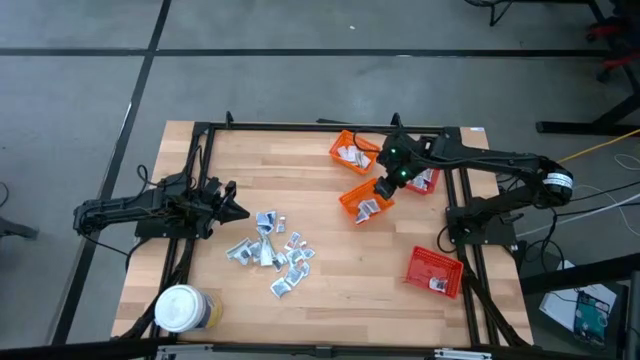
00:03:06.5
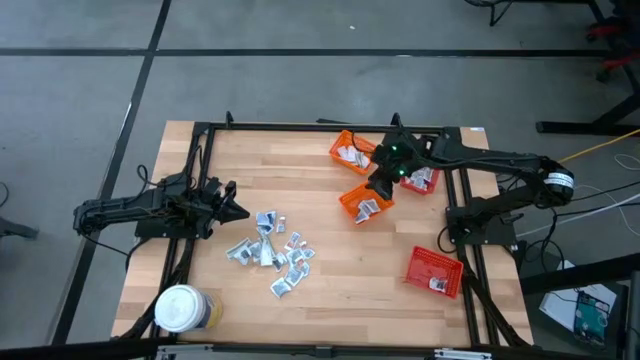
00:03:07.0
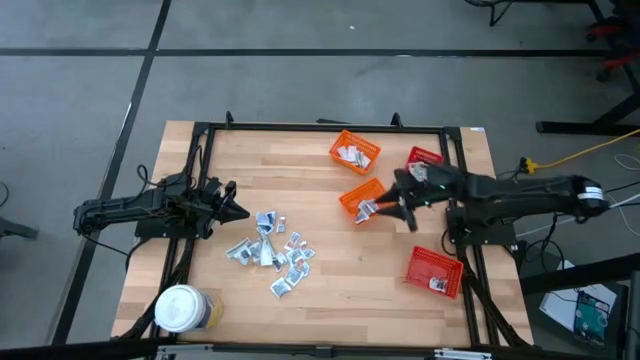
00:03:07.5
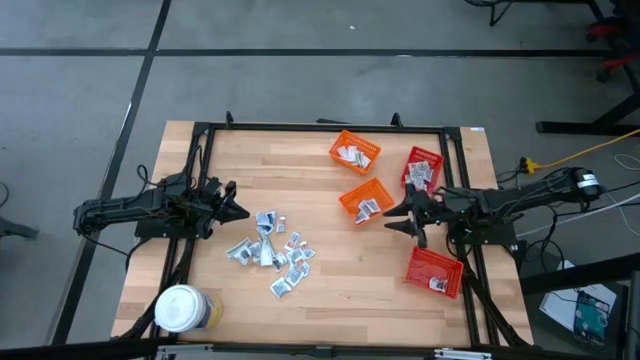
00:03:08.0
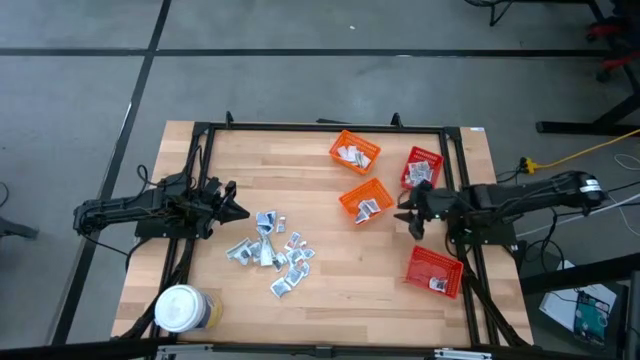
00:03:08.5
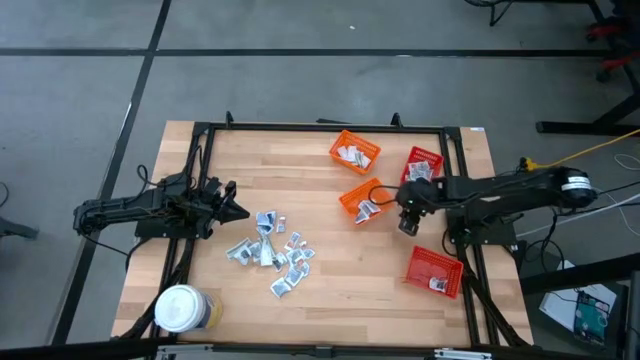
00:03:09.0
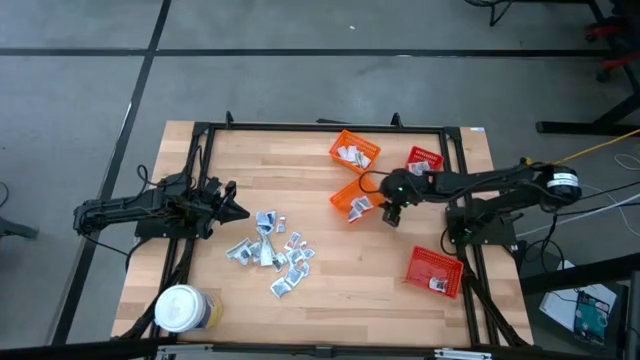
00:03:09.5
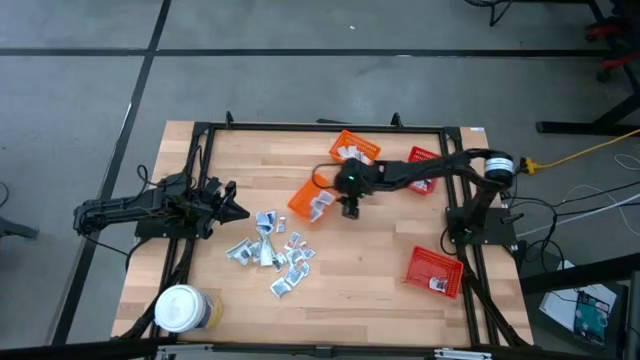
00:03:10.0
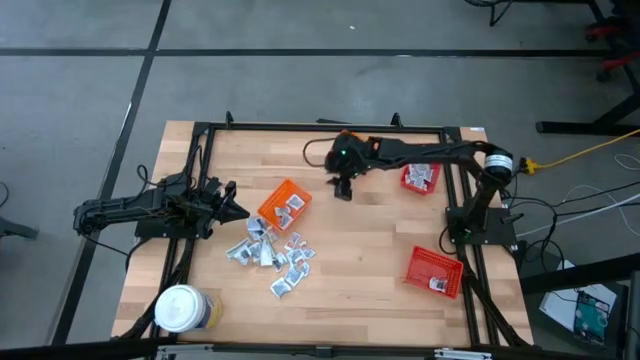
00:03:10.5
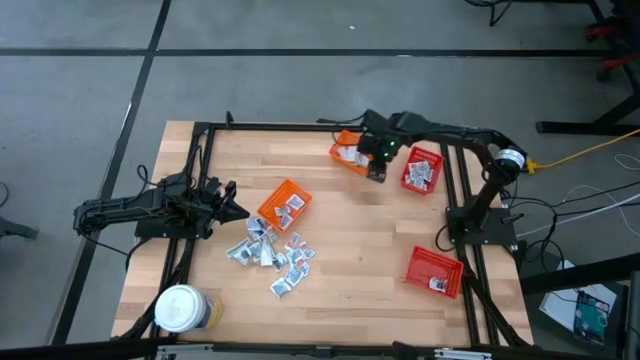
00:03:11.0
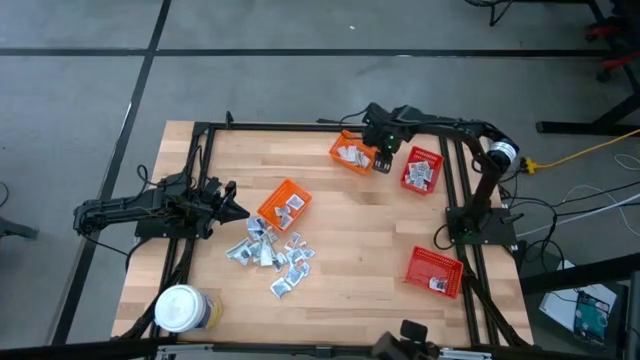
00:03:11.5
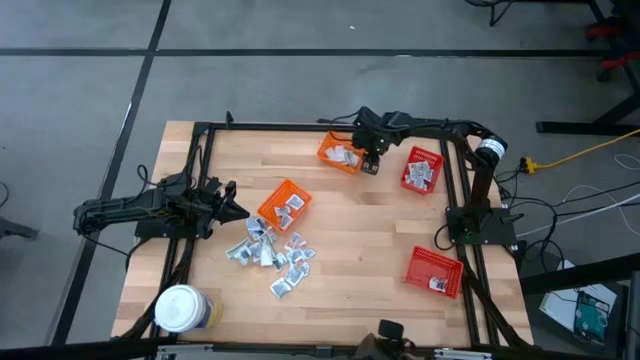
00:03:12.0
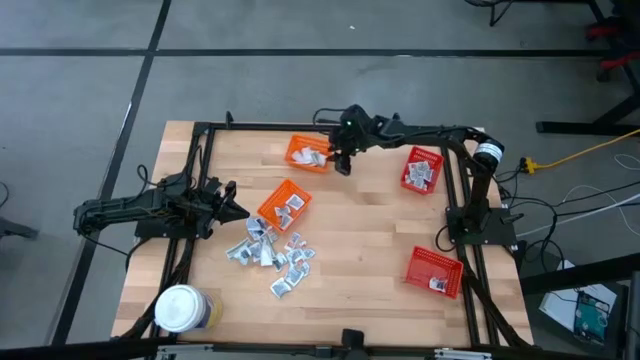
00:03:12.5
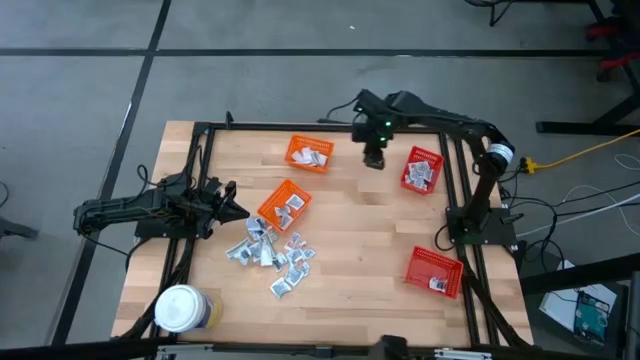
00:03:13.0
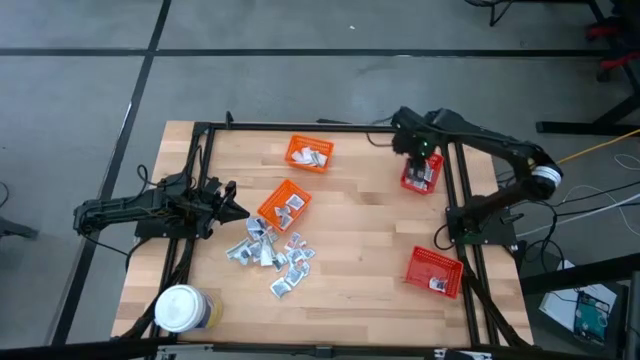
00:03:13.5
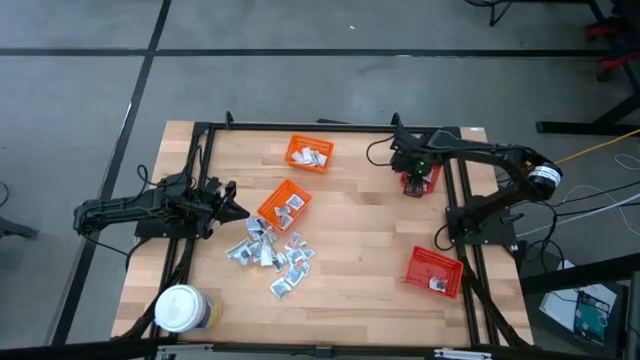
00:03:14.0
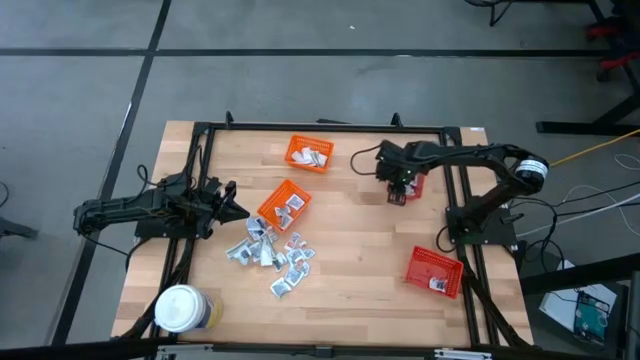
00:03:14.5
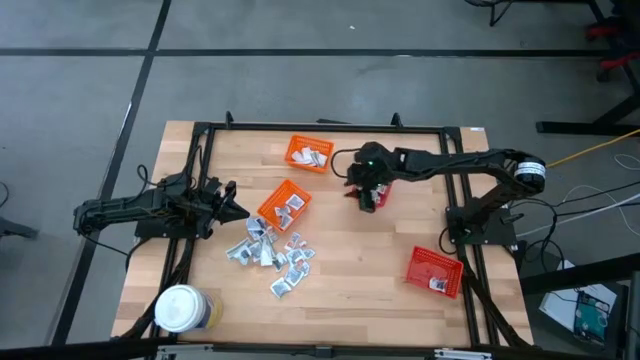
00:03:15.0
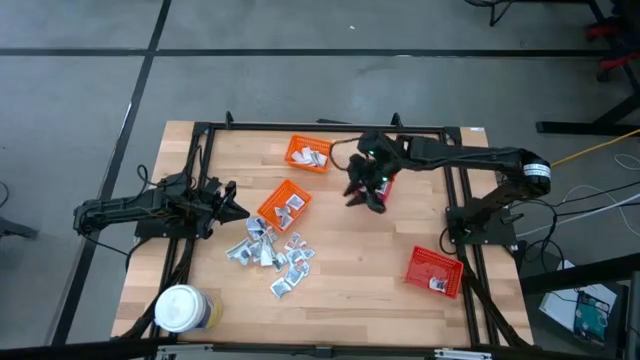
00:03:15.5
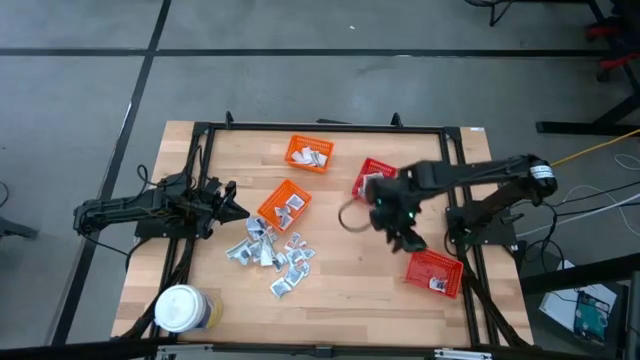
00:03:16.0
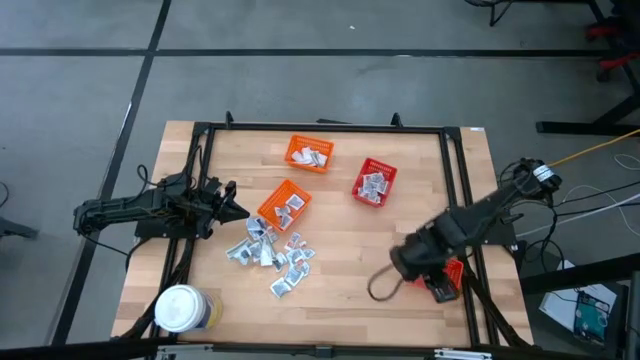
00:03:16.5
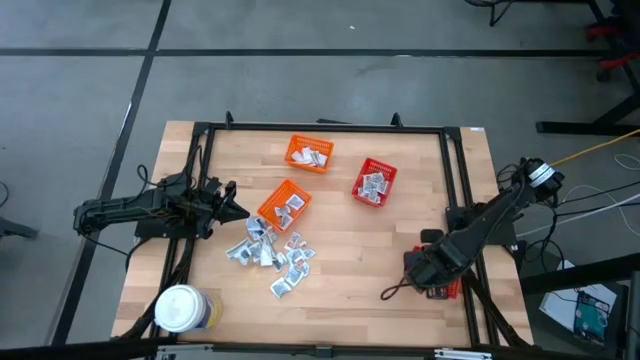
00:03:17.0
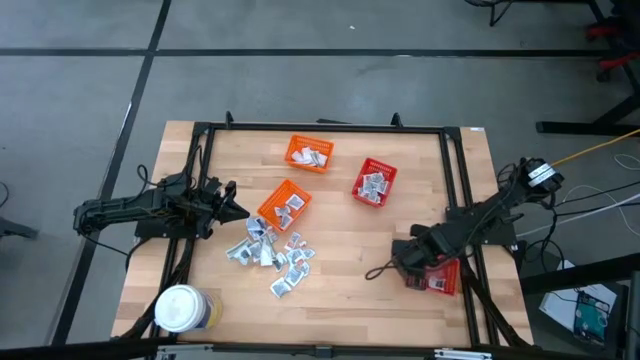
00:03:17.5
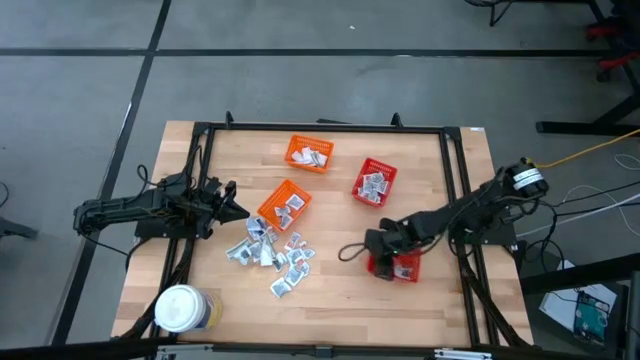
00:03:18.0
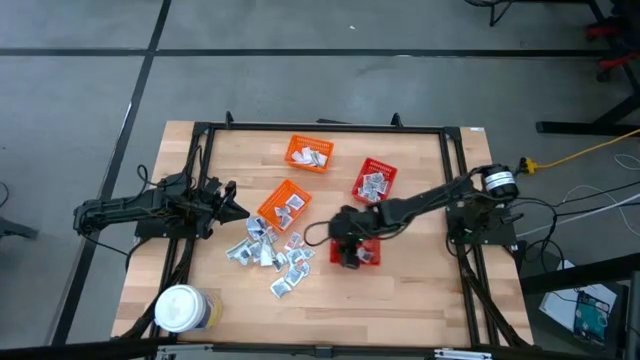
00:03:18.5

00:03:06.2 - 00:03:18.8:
Task: Pick & Place First Aid Supplies
Adjust the bins

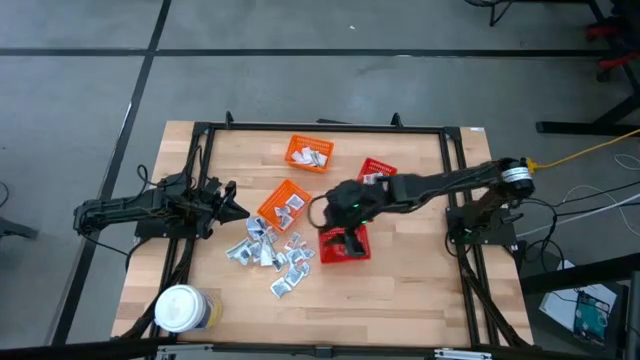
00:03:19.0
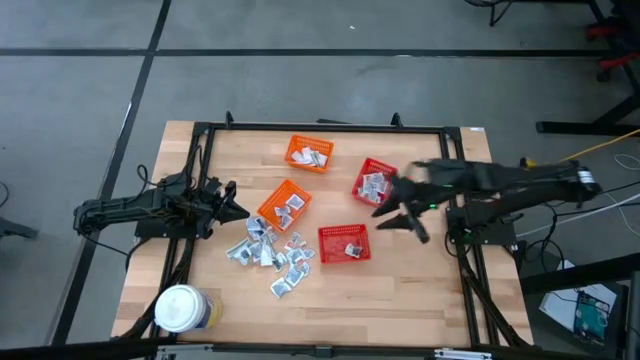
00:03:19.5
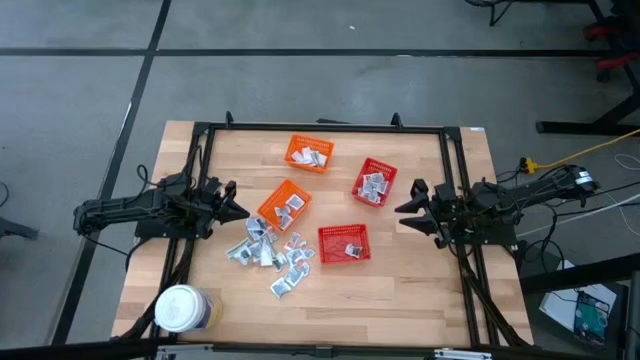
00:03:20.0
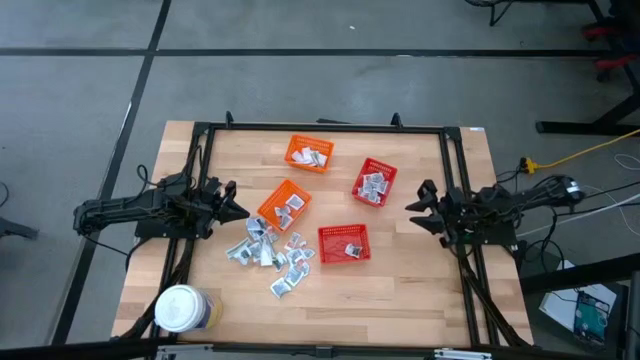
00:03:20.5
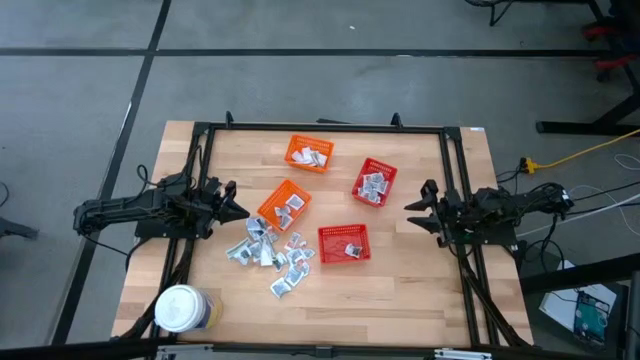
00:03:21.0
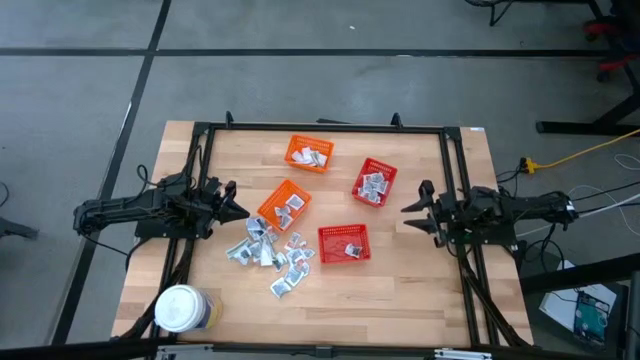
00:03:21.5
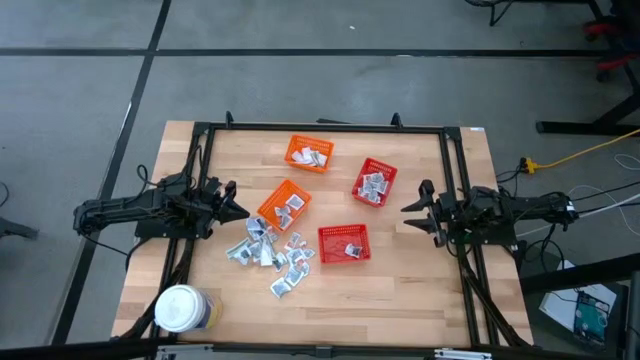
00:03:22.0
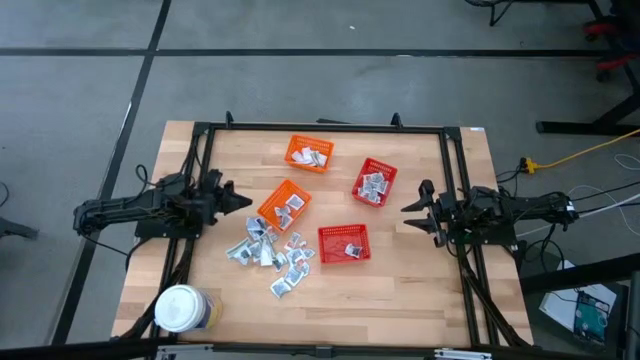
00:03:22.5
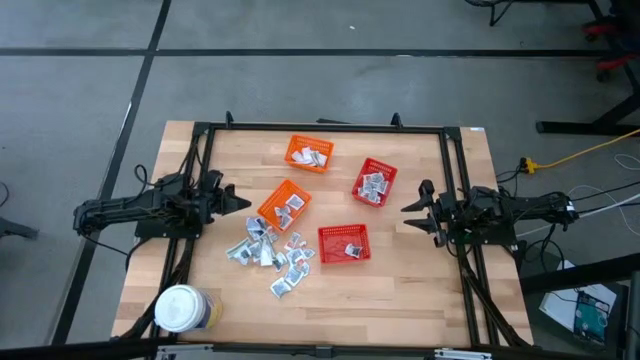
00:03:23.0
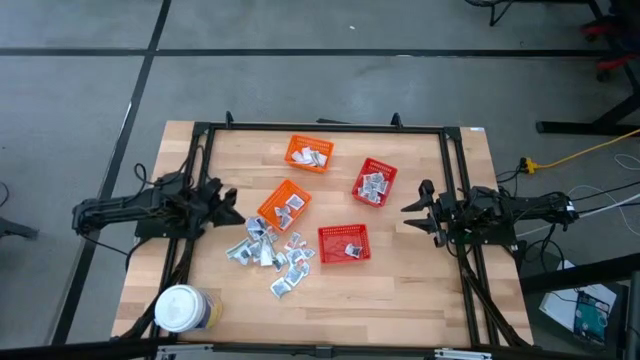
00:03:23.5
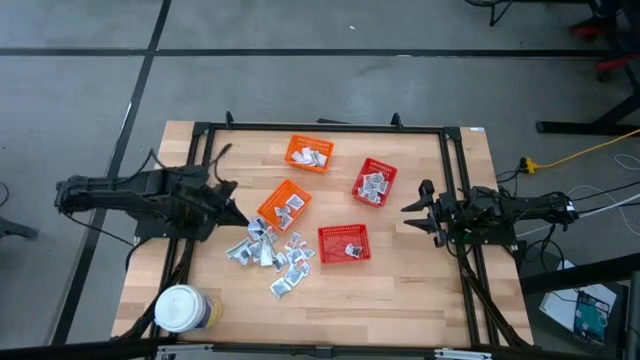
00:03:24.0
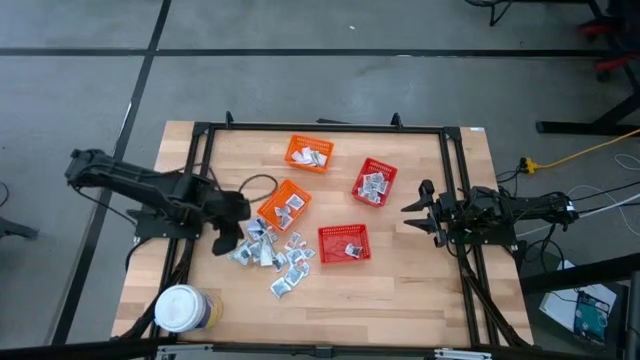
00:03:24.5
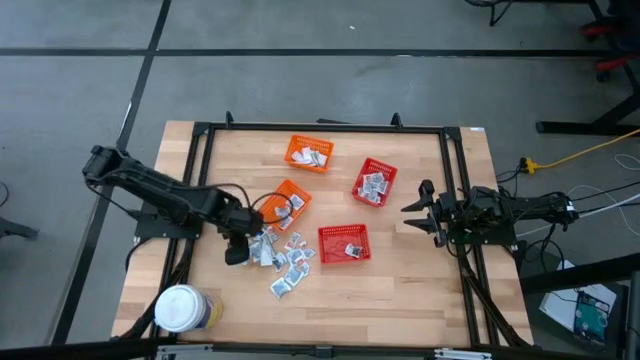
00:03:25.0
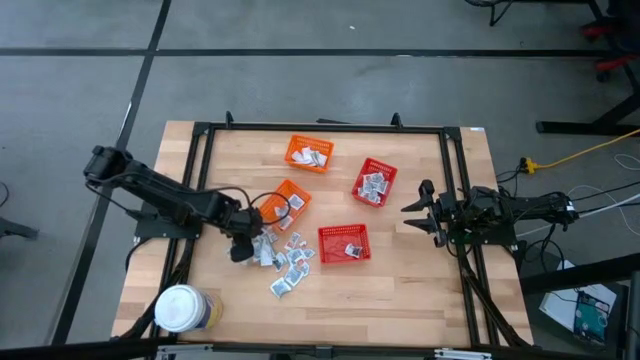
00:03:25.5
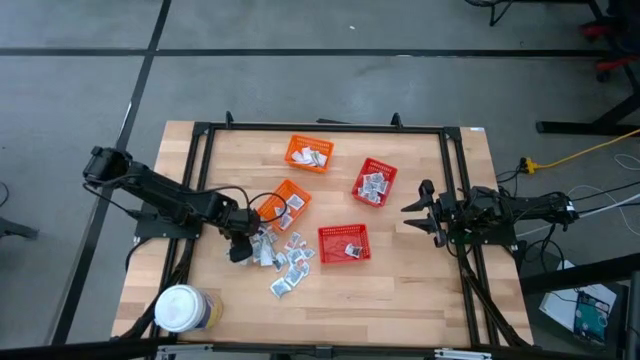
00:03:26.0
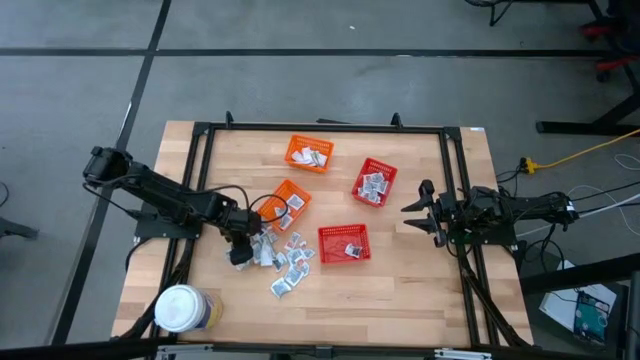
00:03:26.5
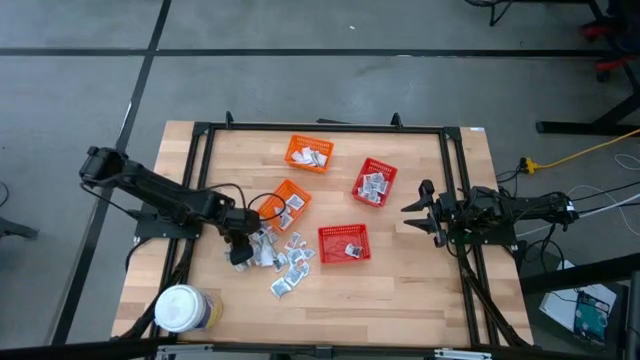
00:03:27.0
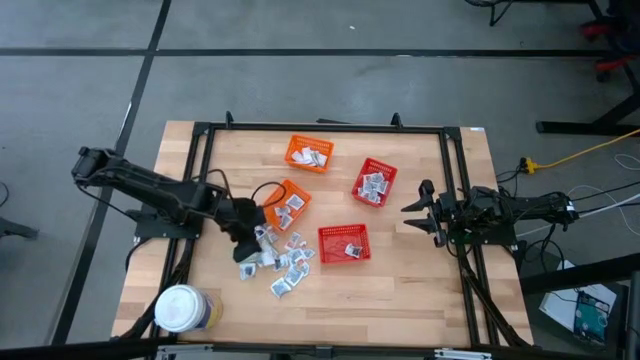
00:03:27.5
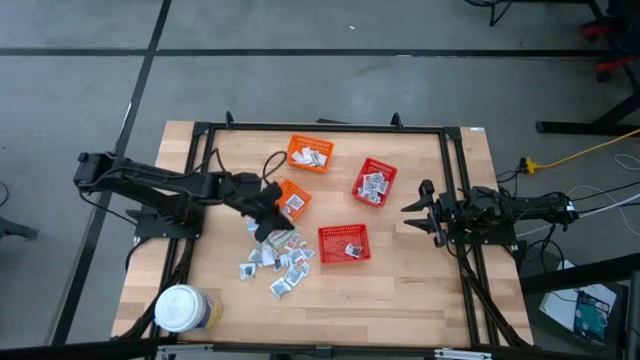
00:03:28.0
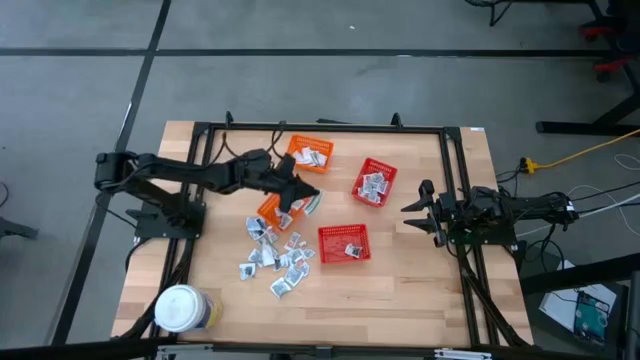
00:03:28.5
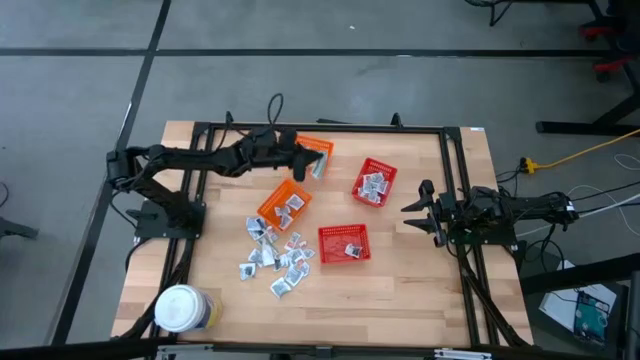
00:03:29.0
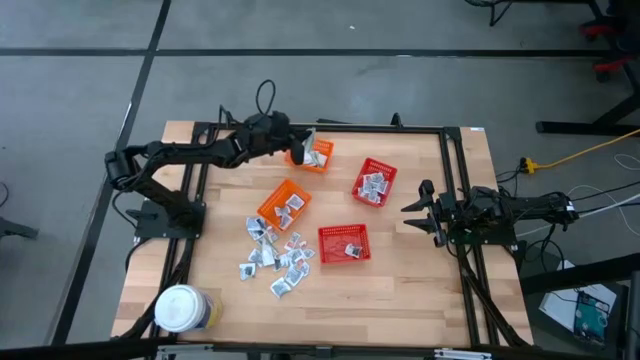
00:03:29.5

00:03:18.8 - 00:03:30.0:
Put the green bandage pack into the top orange bin
